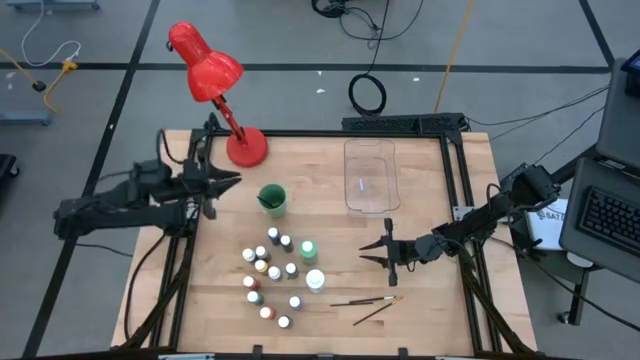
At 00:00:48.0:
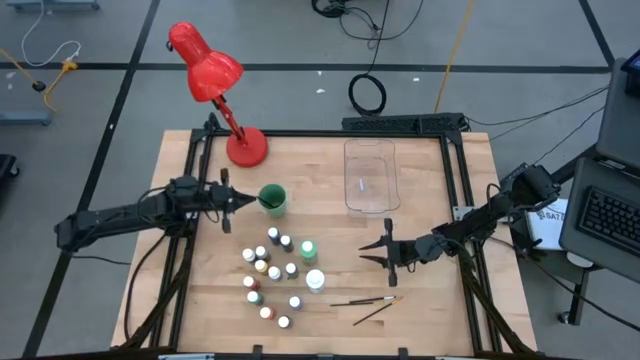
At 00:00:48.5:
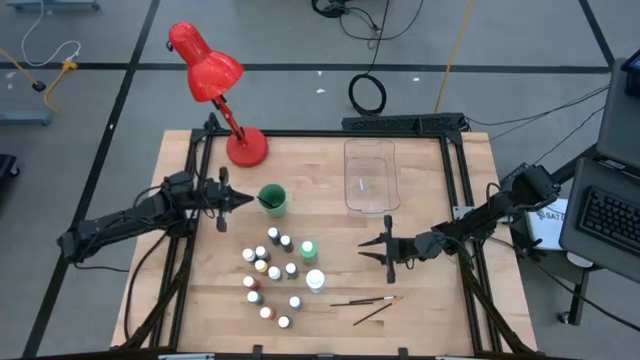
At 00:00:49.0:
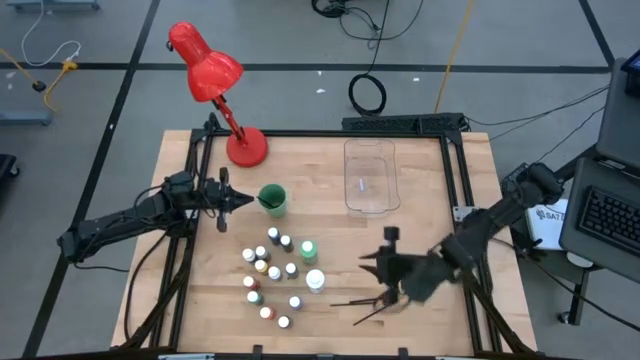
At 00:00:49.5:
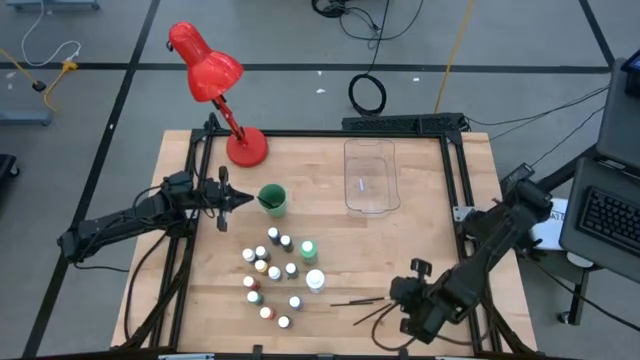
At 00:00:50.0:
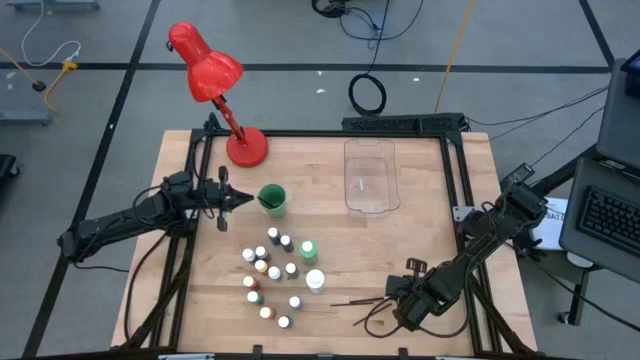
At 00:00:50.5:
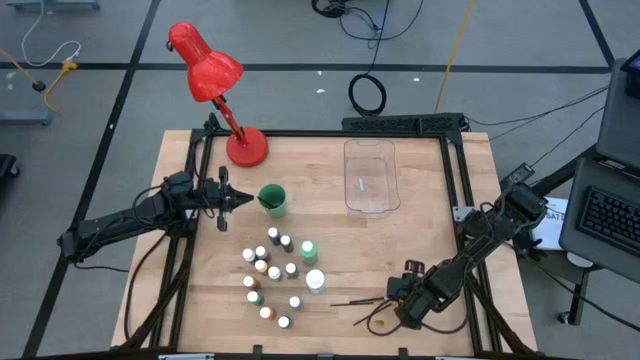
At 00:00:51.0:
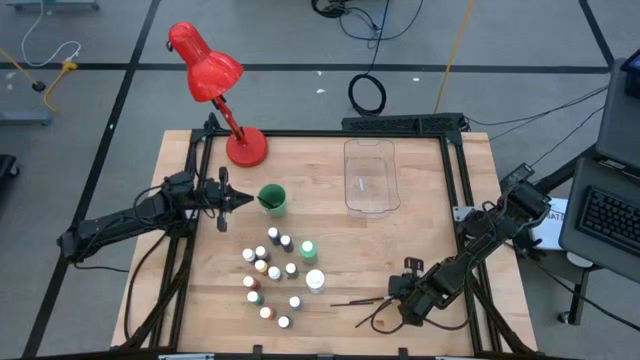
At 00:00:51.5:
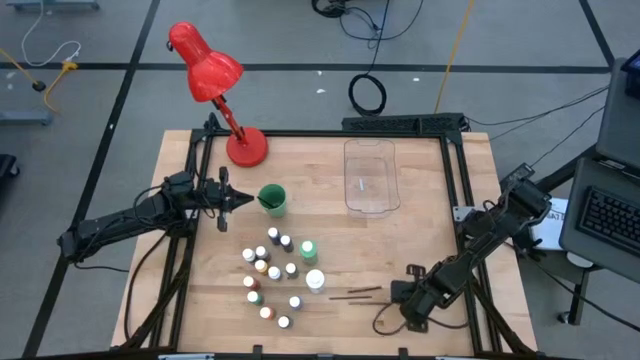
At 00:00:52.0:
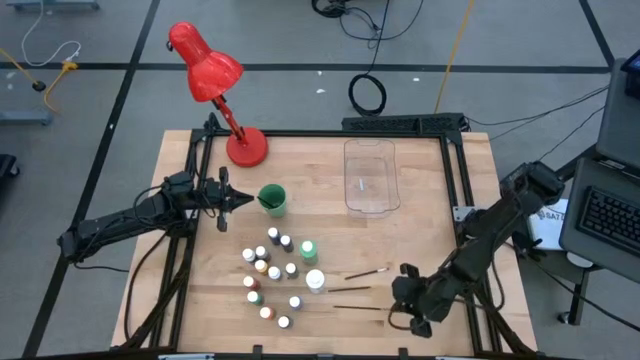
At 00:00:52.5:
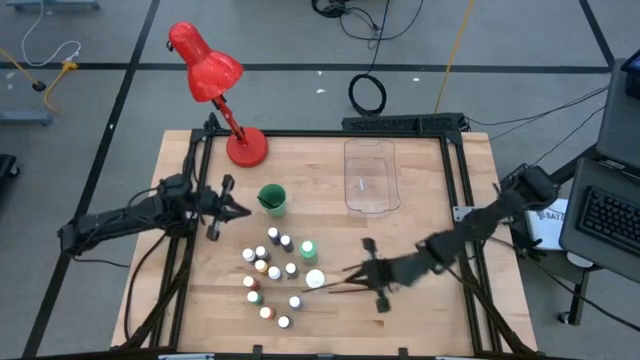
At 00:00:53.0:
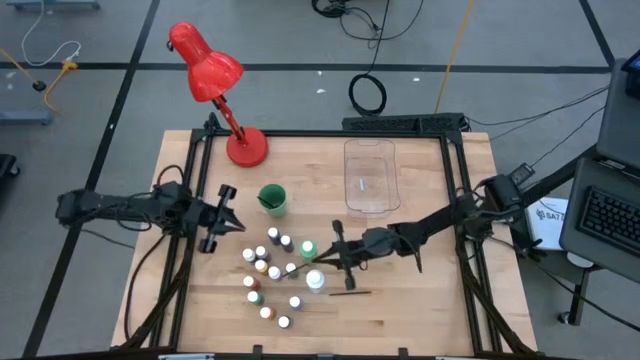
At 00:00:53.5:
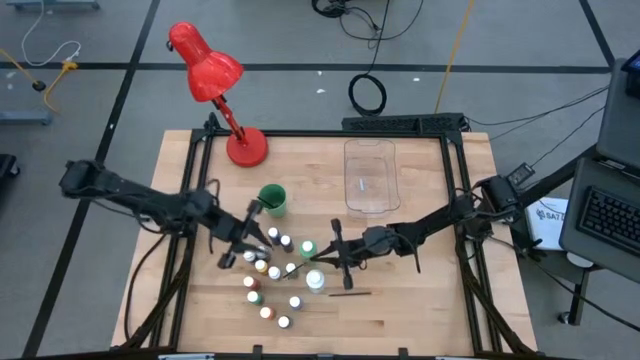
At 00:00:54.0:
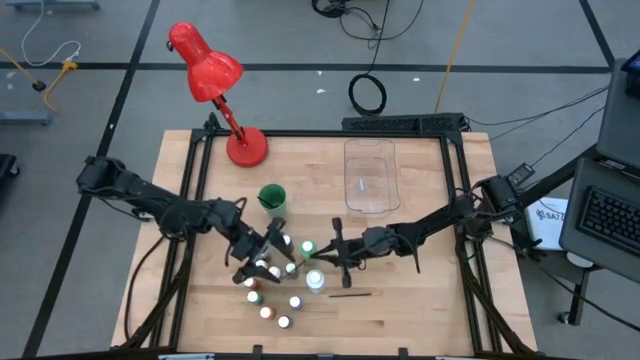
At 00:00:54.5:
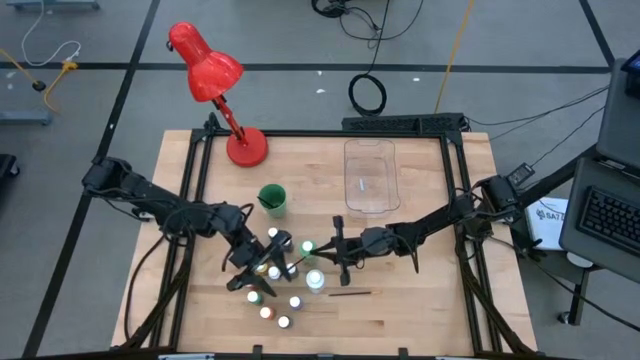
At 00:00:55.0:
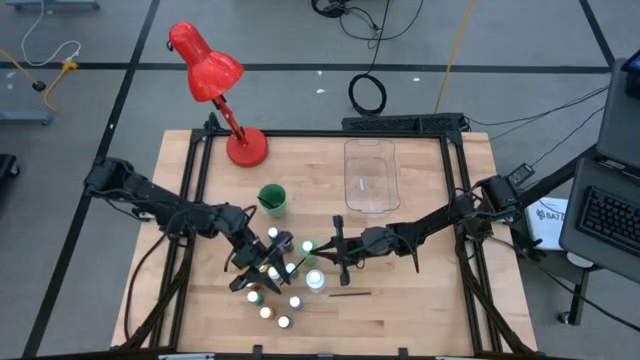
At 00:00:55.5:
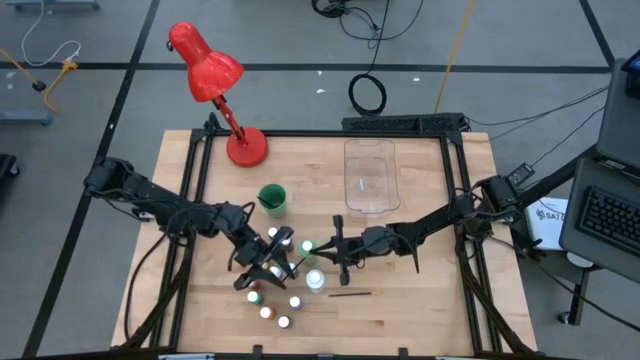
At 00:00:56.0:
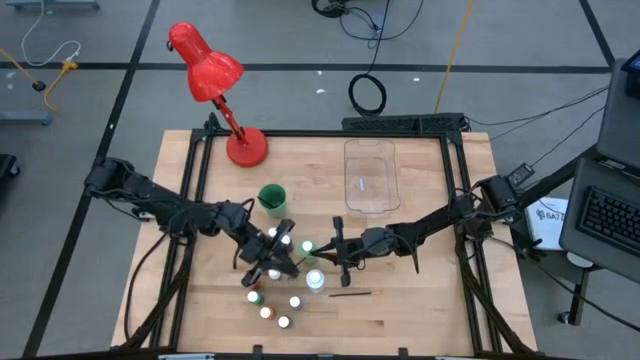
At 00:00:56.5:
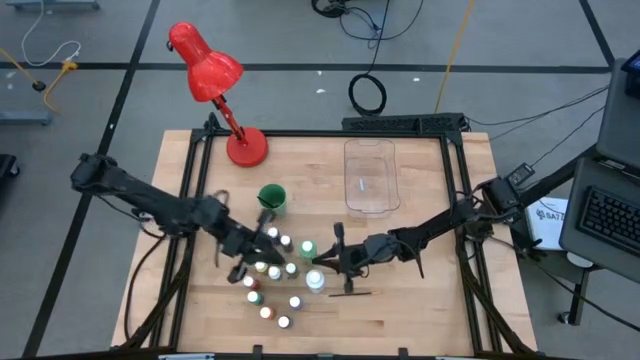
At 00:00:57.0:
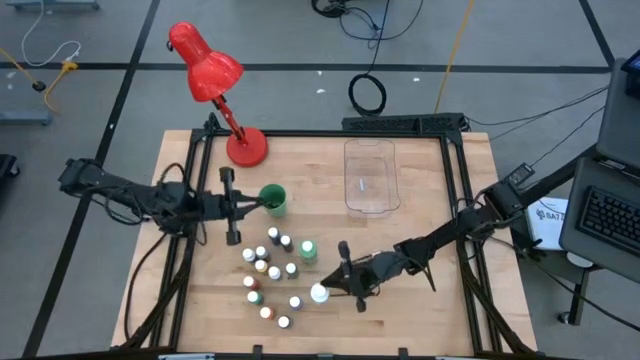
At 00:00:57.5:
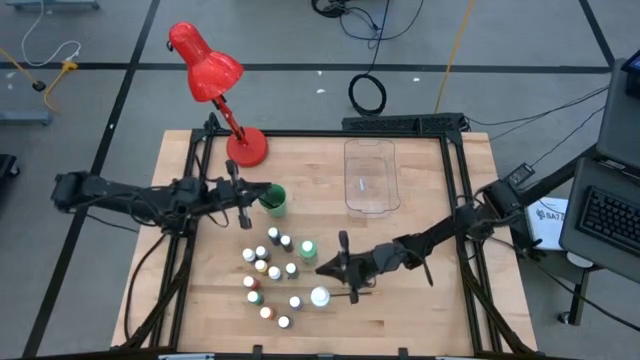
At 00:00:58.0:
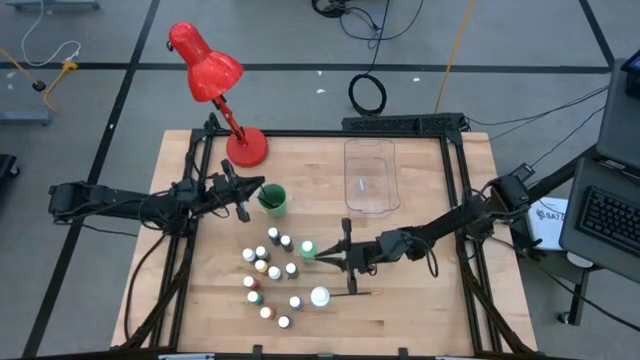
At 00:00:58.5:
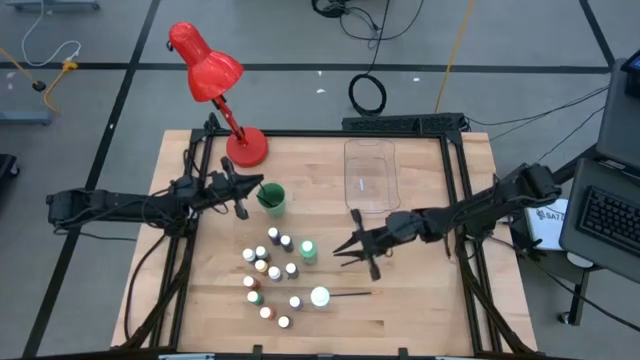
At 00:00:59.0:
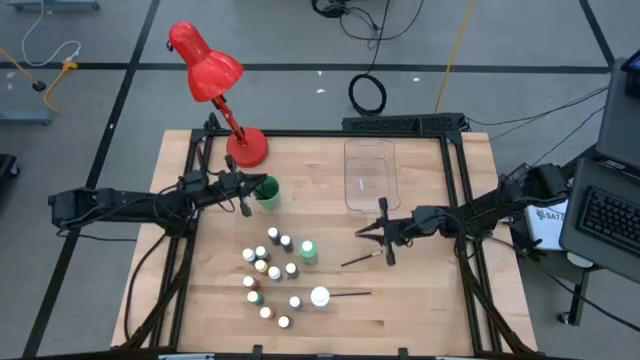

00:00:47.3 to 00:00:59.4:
Task: Pick & Place Paint Supplies
Put the gold paintbrush into the green cup

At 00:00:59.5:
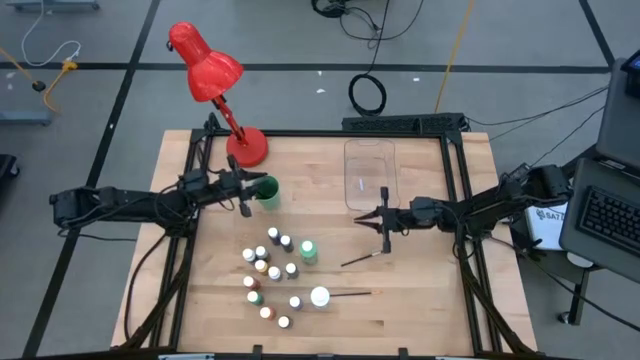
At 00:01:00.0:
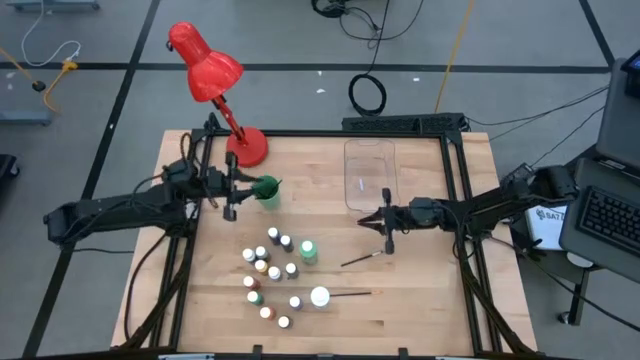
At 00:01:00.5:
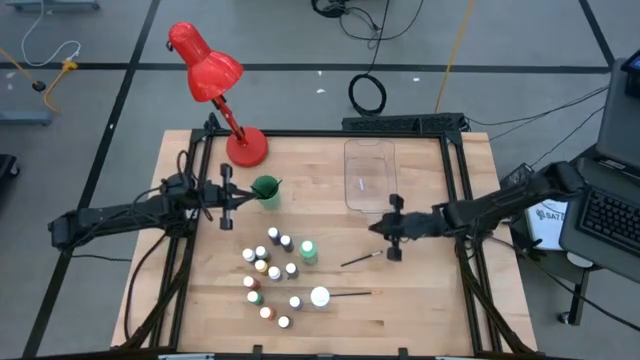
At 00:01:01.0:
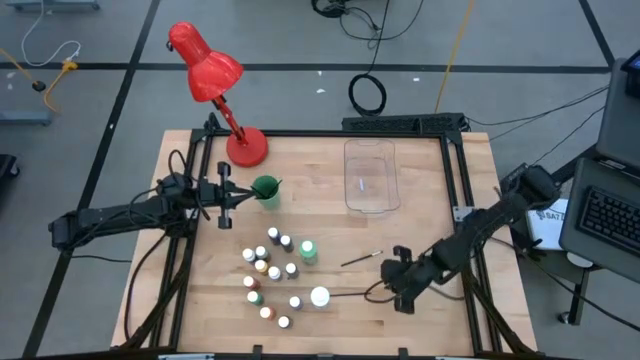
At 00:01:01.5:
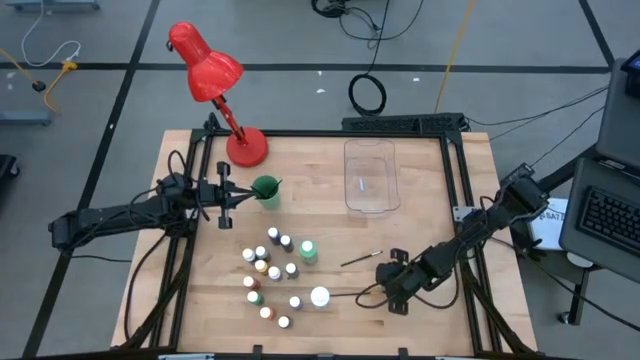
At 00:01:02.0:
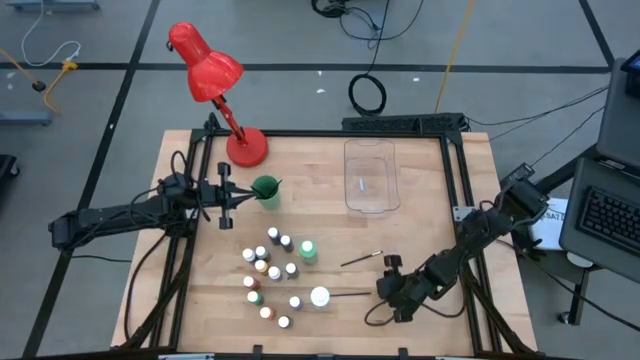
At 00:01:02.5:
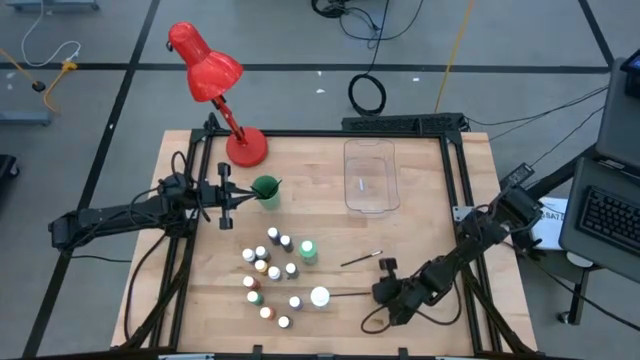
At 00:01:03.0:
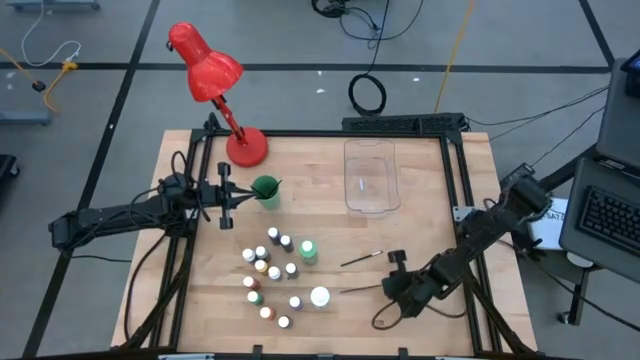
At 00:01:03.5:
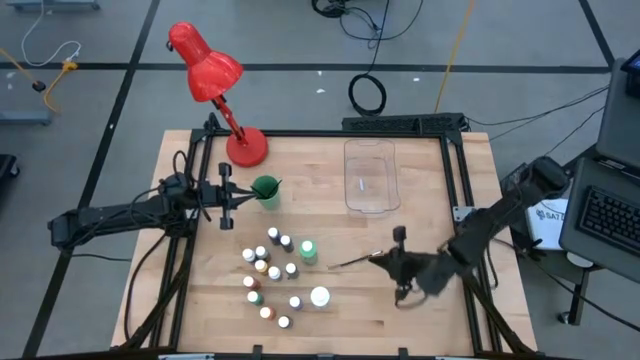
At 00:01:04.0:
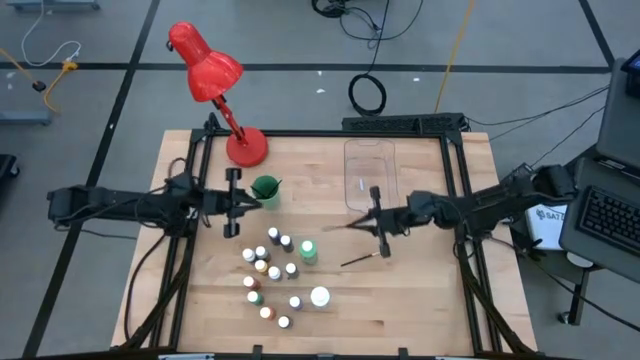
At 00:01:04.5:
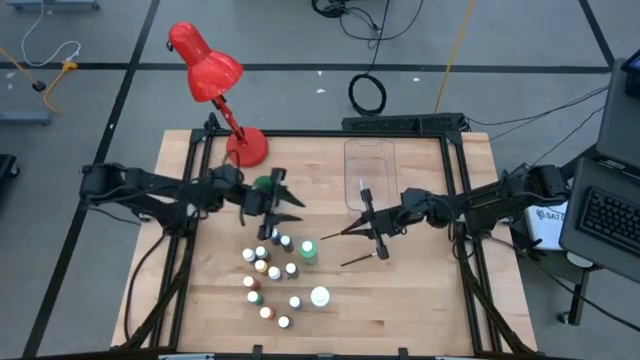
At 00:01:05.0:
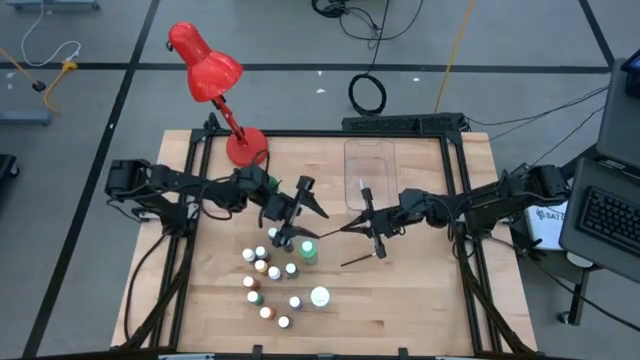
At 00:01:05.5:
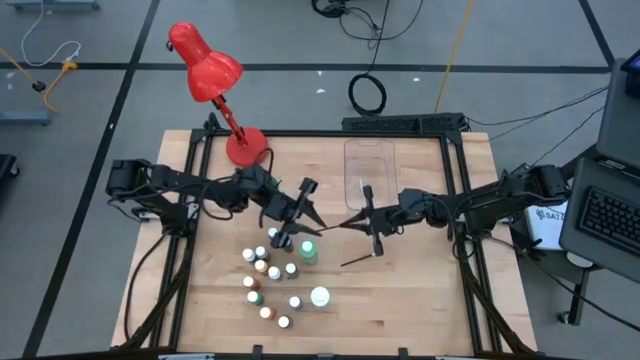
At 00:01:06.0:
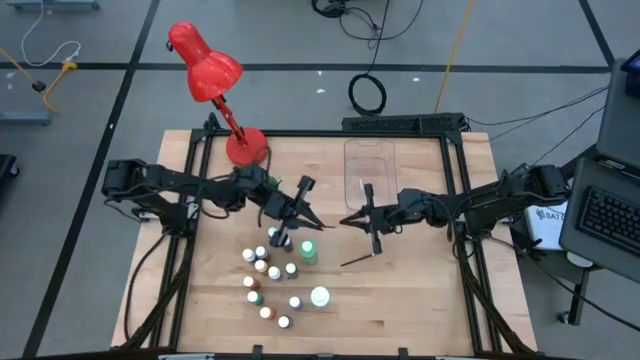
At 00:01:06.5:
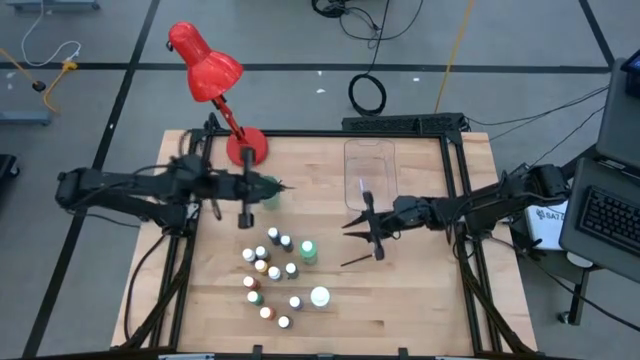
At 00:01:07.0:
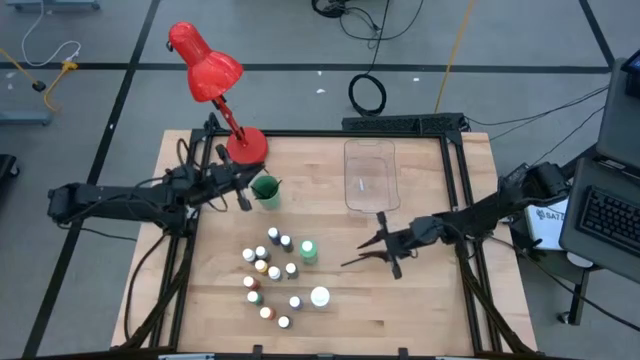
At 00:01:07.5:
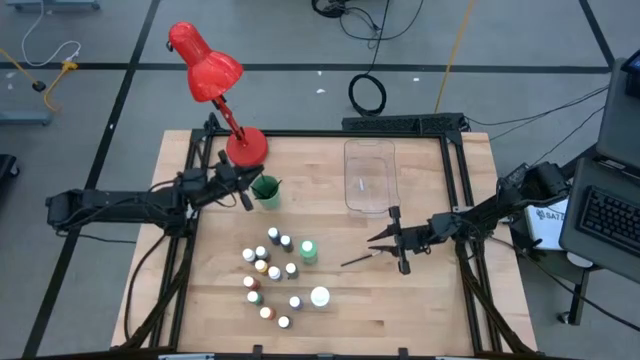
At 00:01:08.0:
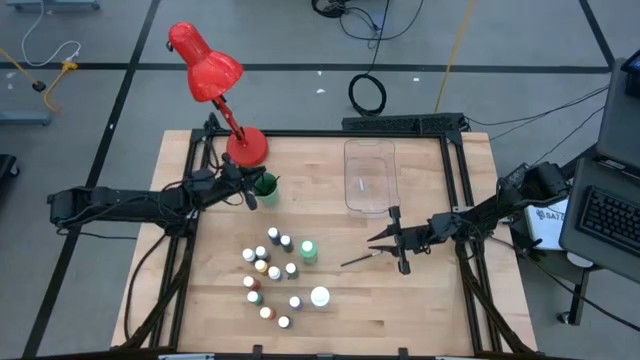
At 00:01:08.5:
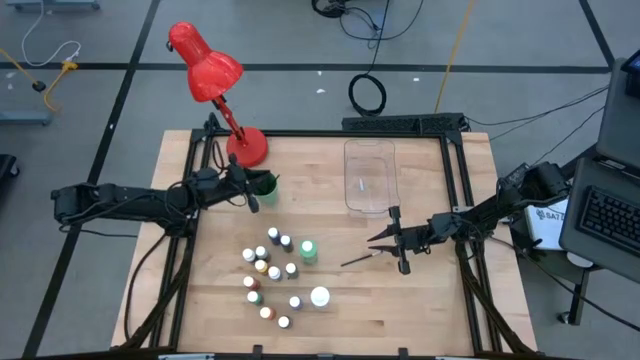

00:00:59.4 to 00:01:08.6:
Put the gold paintbrush into the green cup
